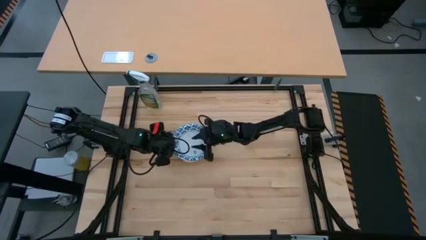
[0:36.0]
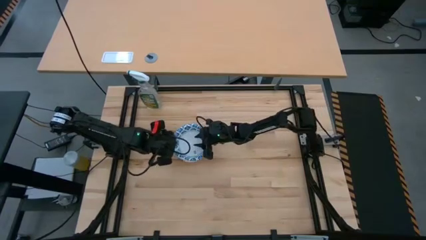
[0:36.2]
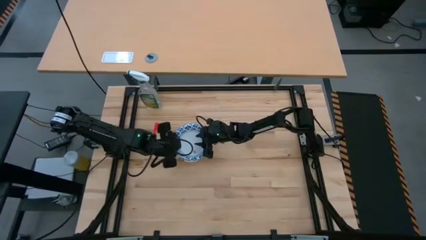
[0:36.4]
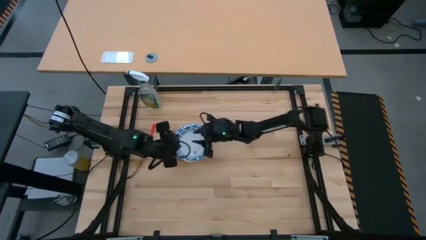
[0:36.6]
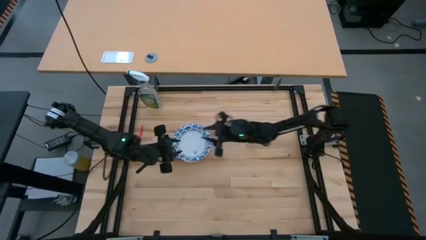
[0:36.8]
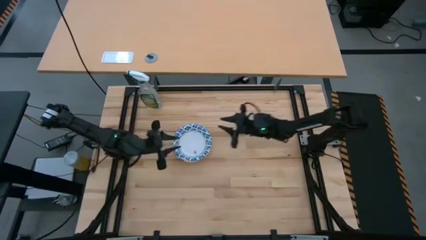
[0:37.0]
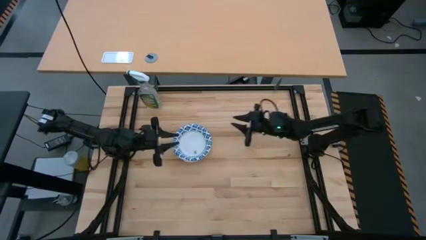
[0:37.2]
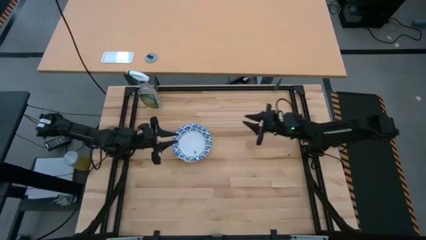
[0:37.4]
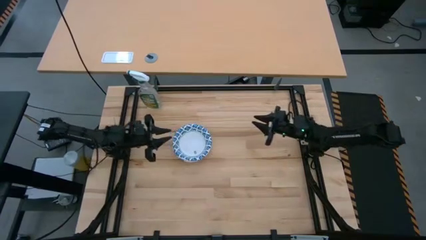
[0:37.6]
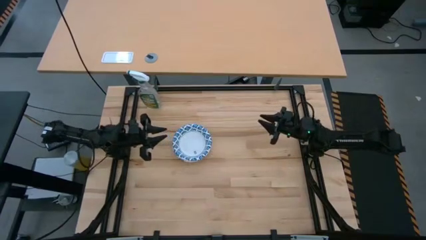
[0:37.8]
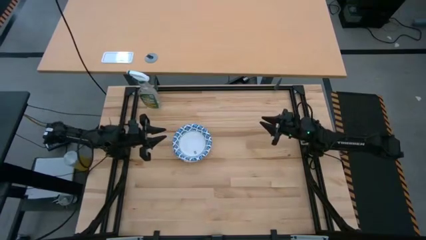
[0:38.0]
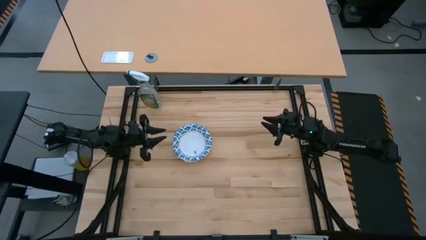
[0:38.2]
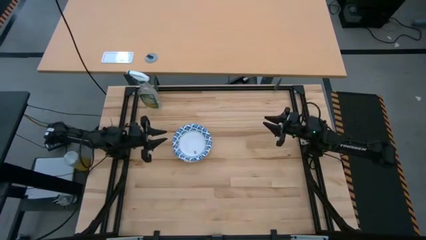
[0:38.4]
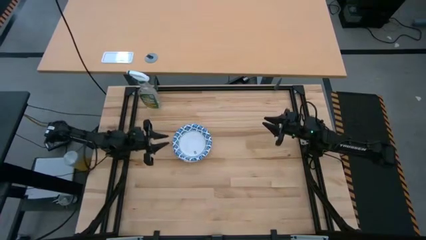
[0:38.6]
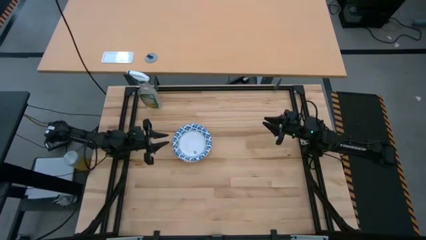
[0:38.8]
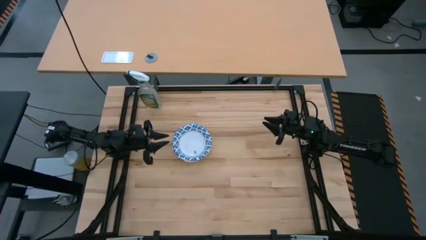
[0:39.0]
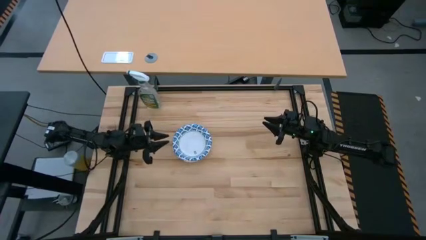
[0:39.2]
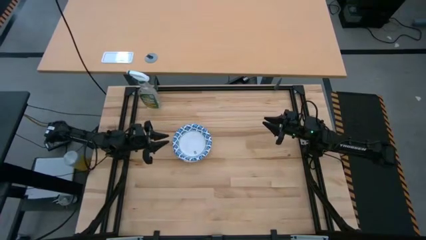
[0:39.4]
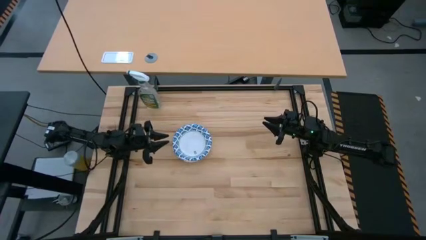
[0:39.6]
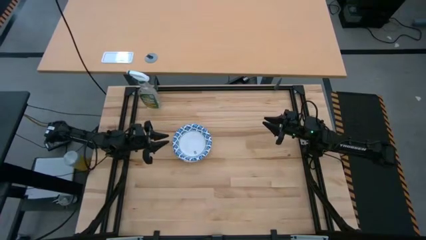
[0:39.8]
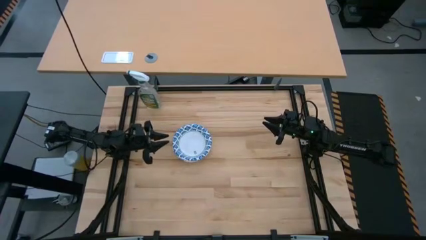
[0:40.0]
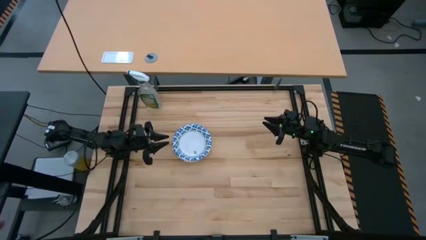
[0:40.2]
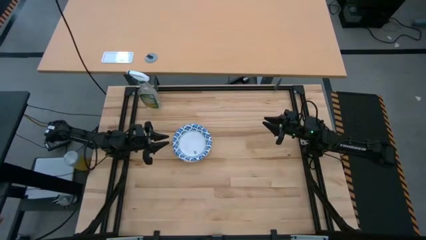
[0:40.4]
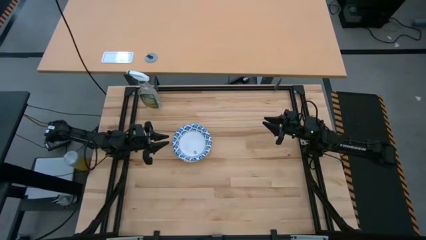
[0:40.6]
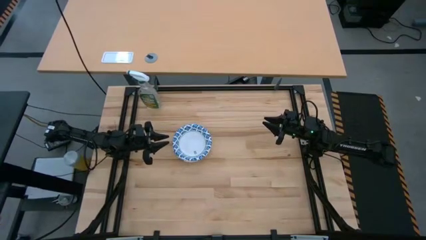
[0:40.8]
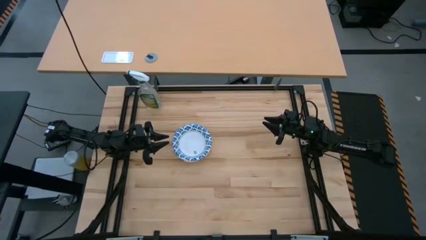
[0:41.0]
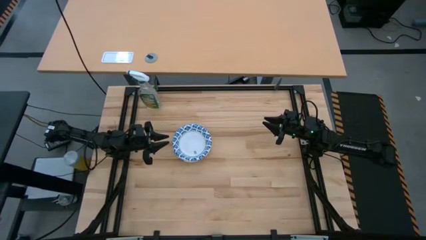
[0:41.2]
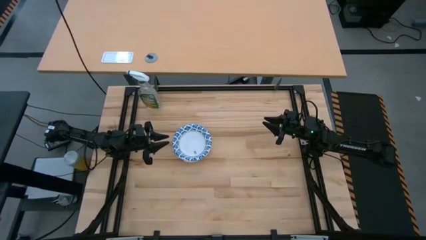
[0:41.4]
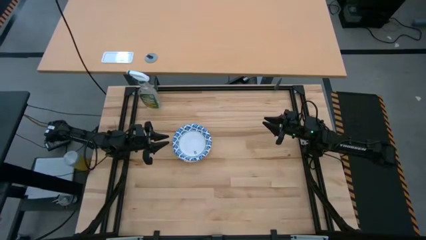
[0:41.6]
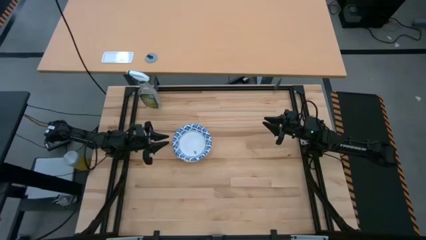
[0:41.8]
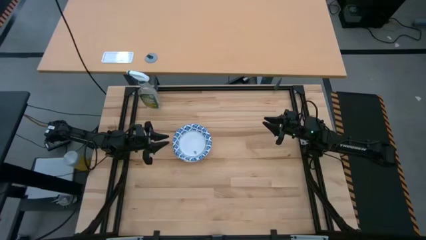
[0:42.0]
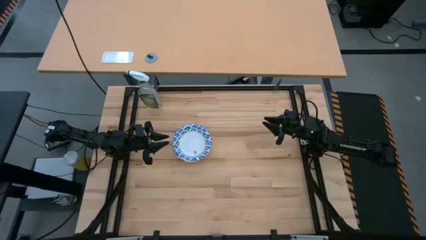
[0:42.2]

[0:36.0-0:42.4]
Return to Home Position

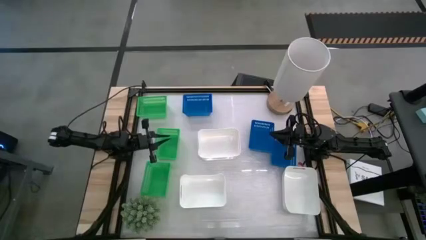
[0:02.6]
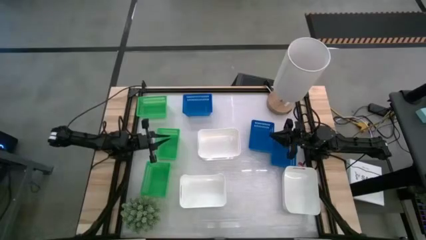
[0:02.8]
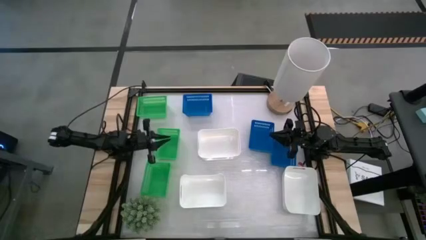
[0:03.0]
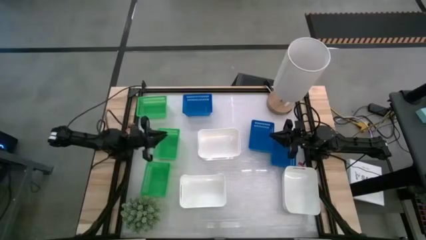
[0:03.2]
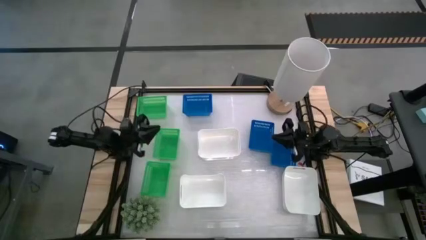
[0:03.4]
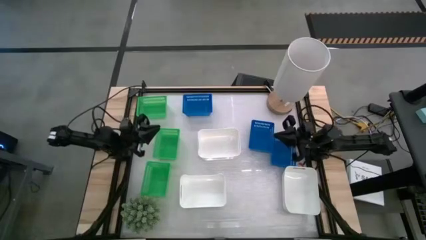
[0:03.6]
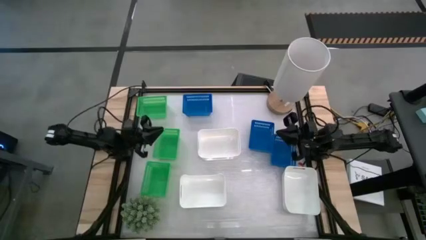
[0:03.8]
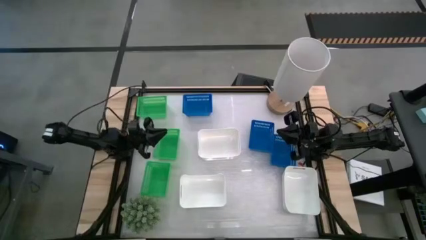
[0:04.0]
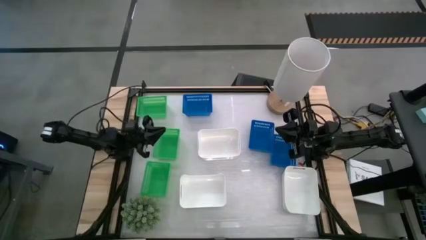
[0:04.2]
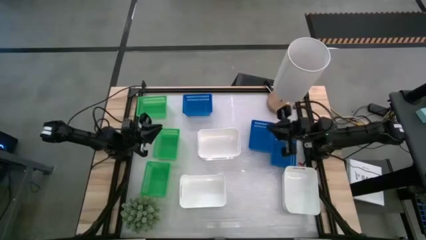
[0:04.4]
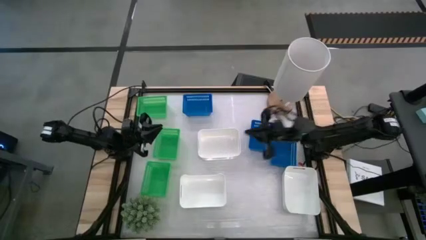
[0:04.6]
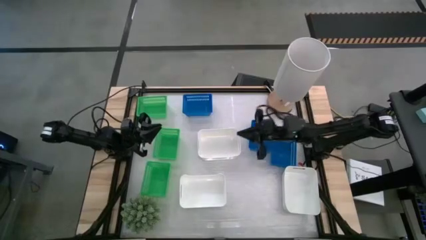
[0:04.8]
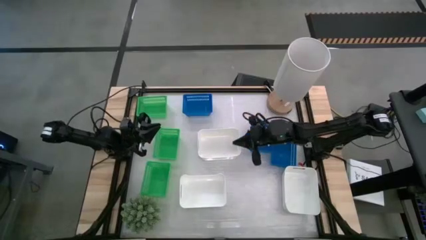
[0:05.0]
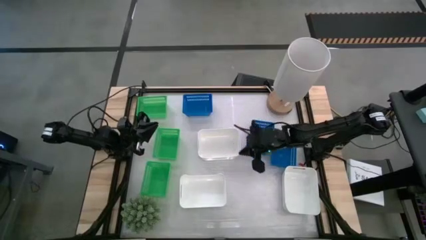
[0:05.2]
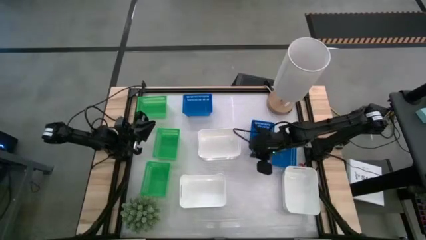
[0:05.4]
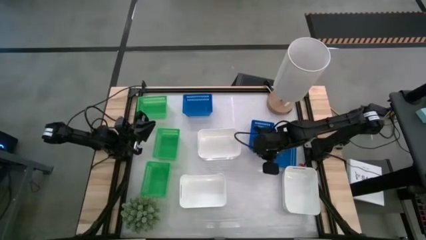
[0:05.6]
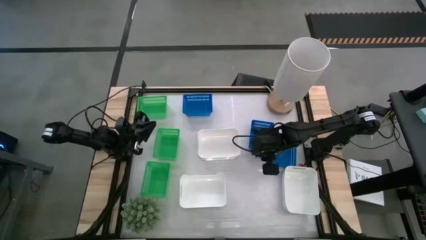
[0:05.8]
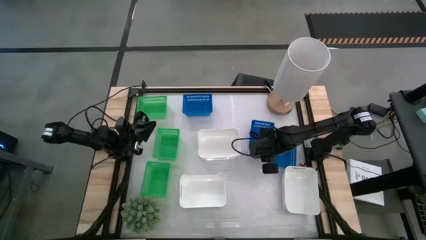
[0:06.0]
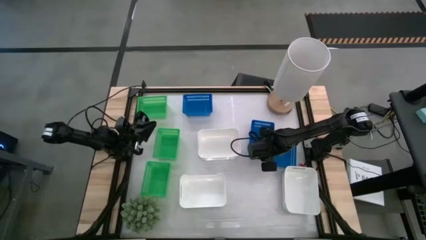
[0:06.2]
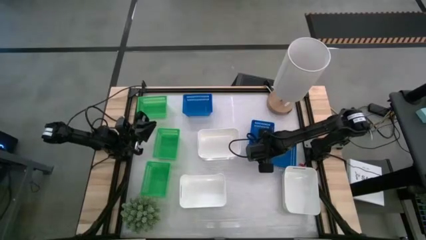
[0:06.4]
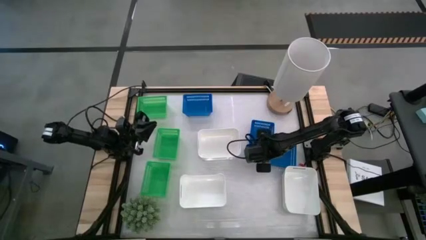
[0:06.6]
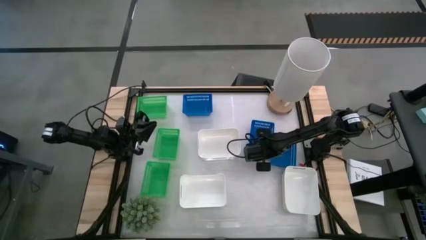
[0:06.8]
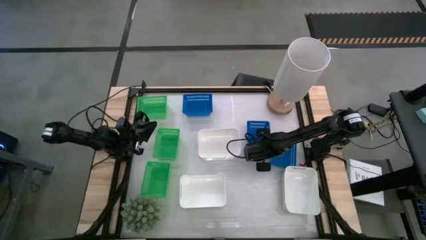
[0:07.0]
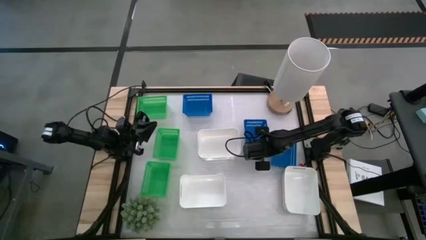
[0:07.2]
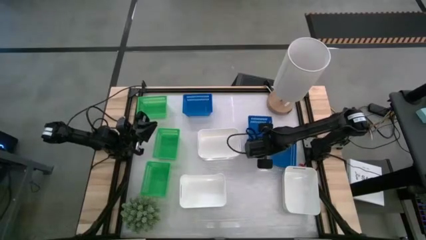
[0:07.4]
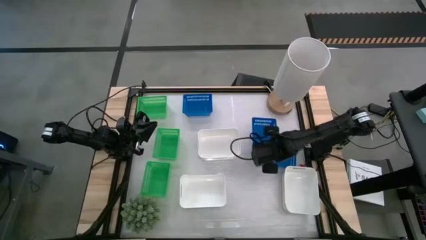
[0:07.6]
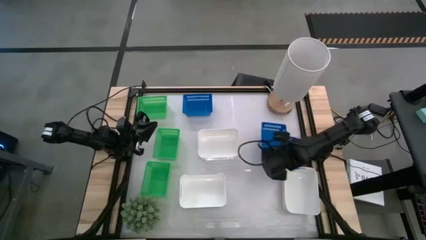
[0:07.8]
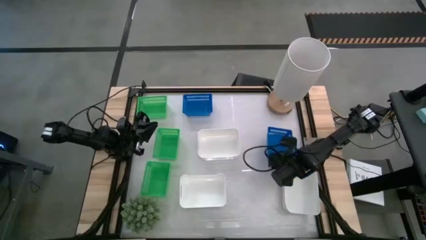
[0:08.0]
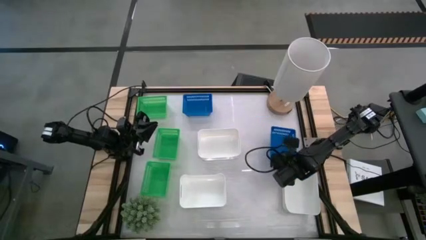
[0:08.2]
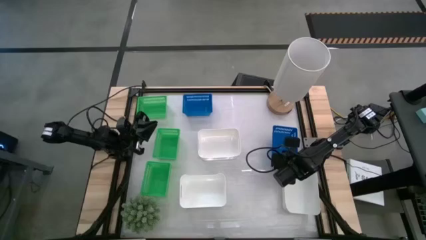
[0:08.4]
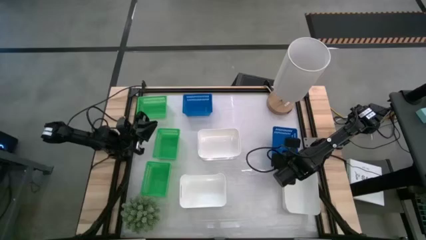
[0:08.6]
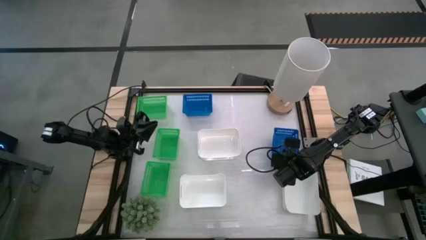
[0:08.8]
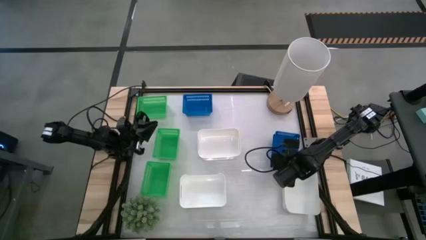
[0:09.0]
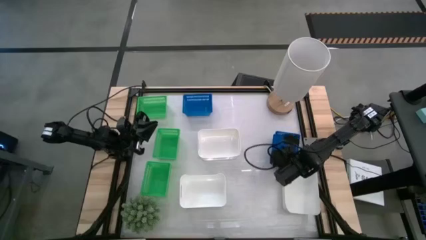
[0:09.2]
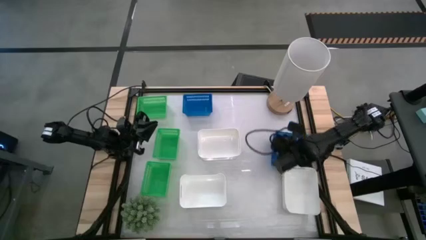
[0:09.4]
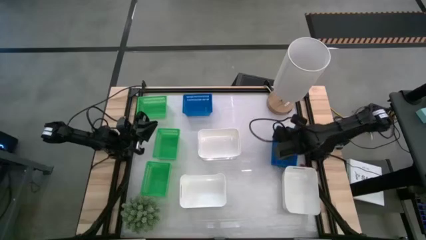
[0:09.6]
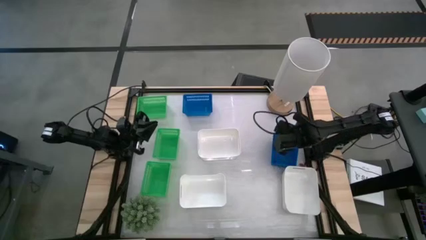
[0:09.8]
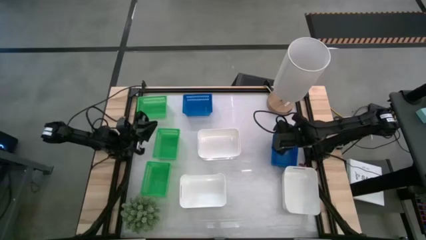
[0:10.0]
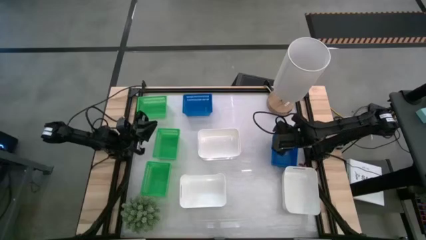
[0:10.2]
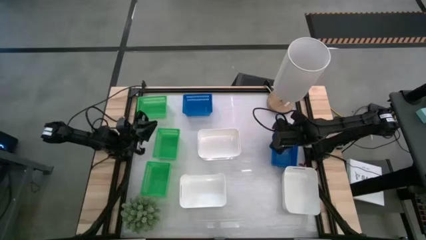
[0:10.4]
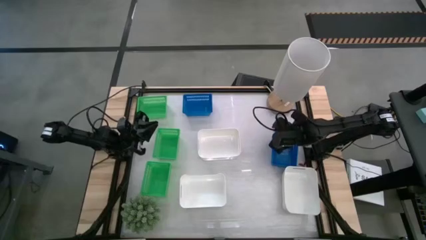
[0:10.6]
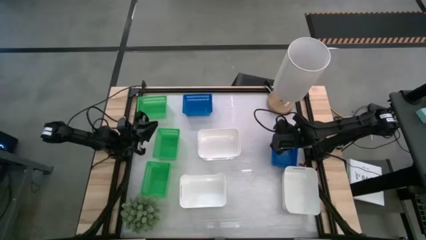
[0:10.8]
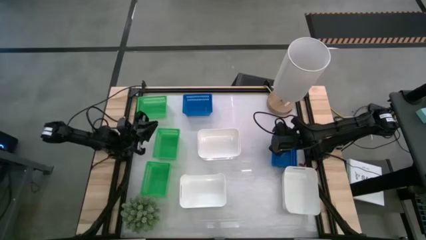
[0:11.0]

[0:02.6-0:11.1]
Stack the middle blue bin on the bottom blue bin
